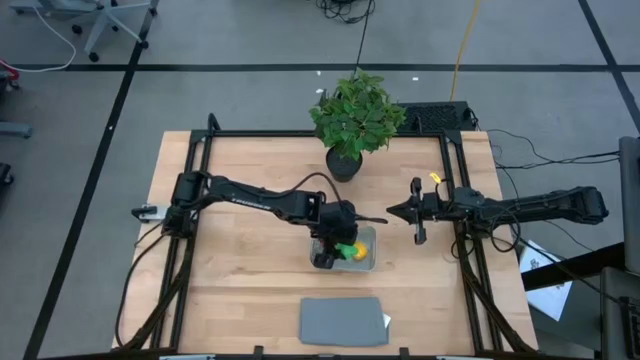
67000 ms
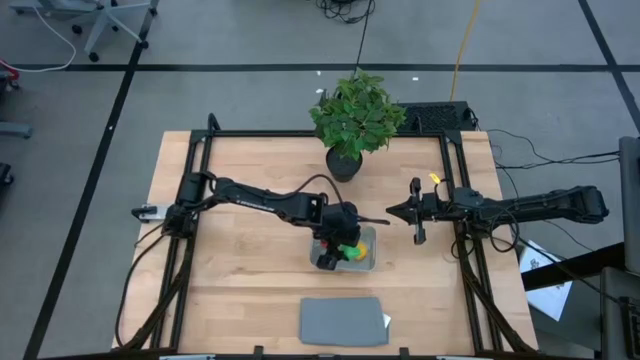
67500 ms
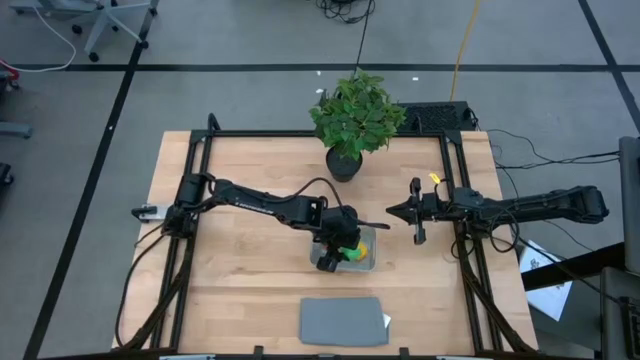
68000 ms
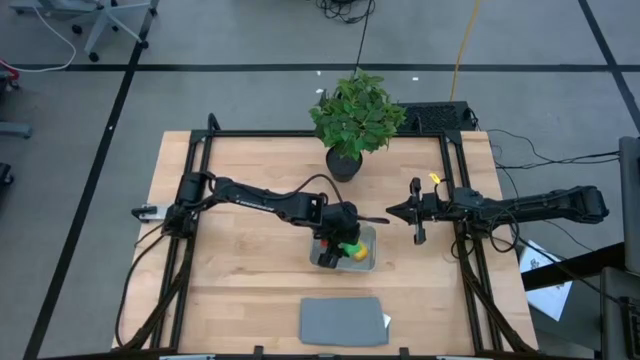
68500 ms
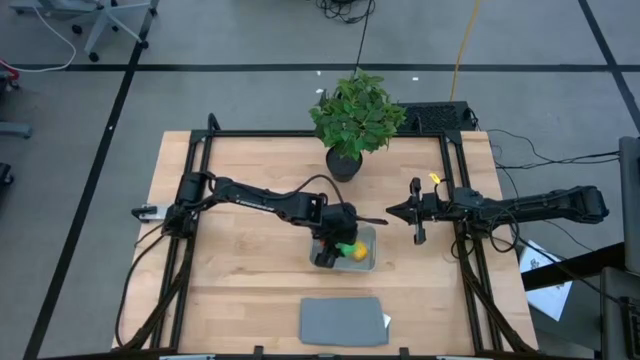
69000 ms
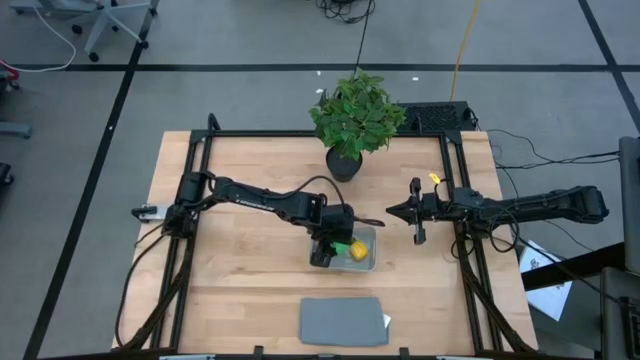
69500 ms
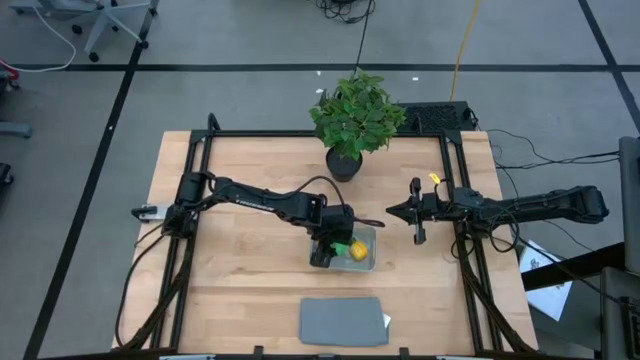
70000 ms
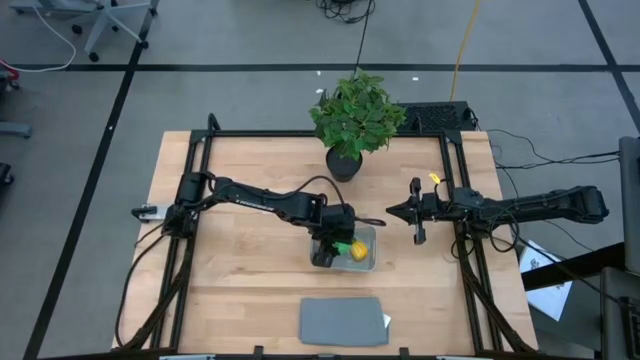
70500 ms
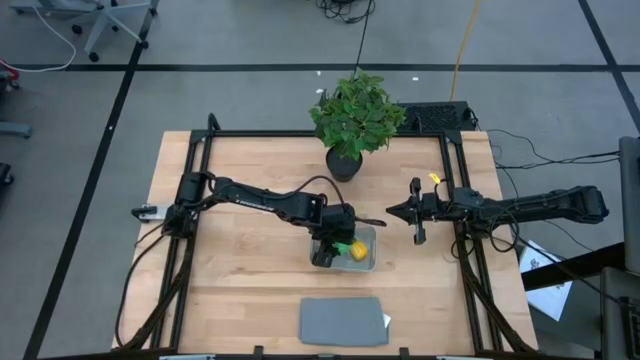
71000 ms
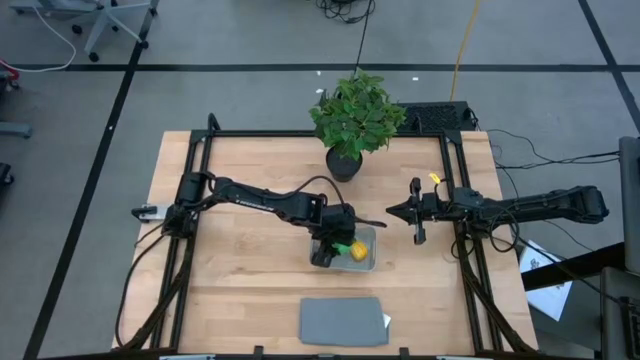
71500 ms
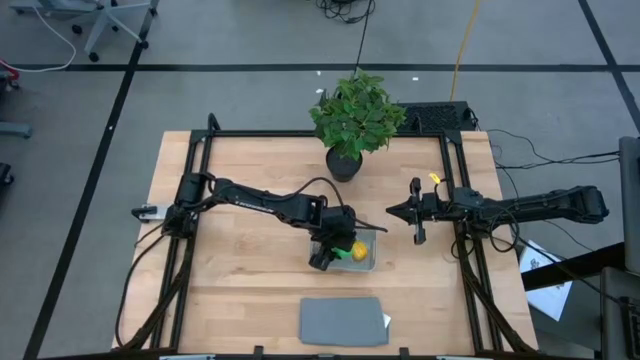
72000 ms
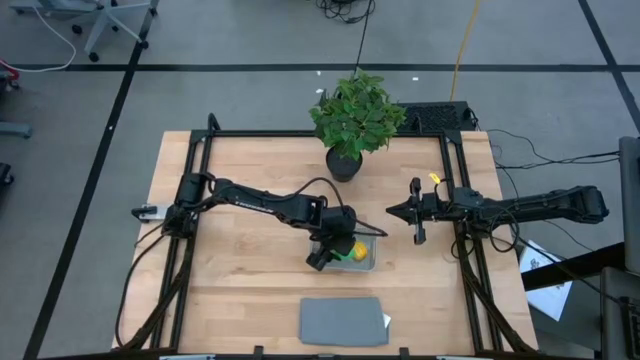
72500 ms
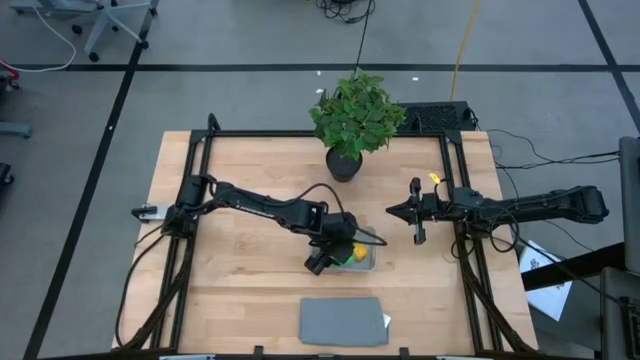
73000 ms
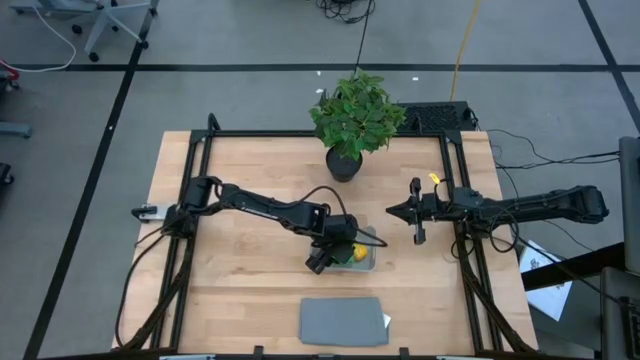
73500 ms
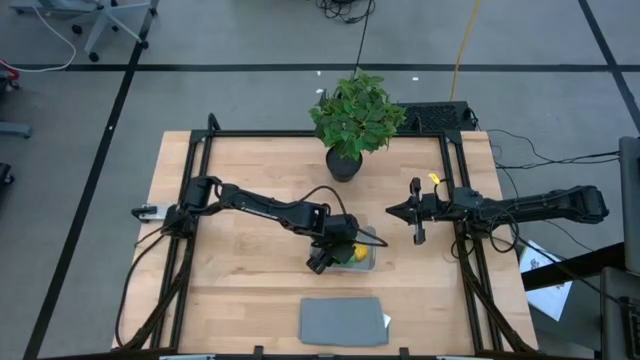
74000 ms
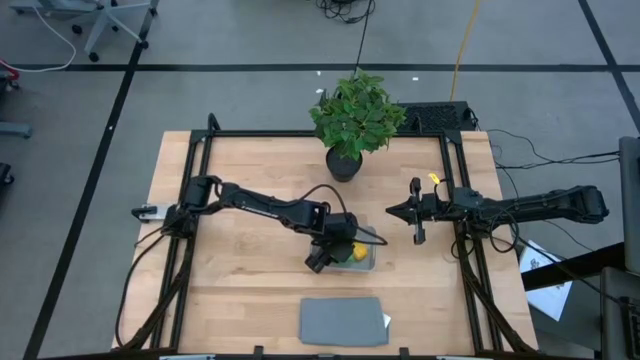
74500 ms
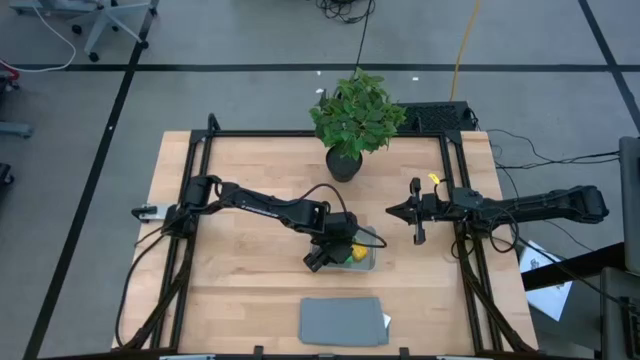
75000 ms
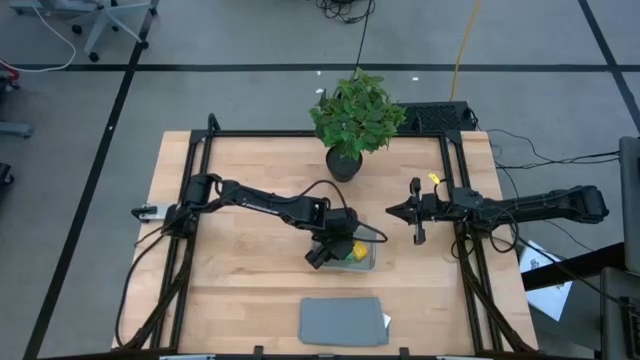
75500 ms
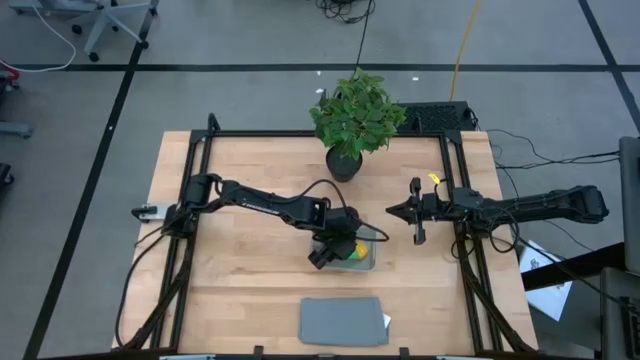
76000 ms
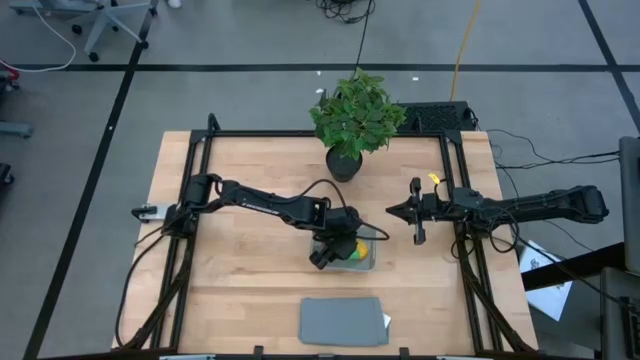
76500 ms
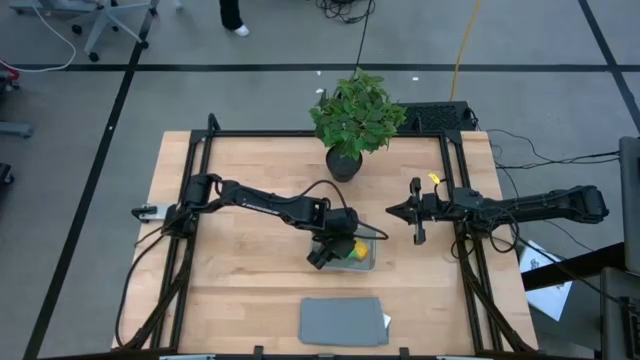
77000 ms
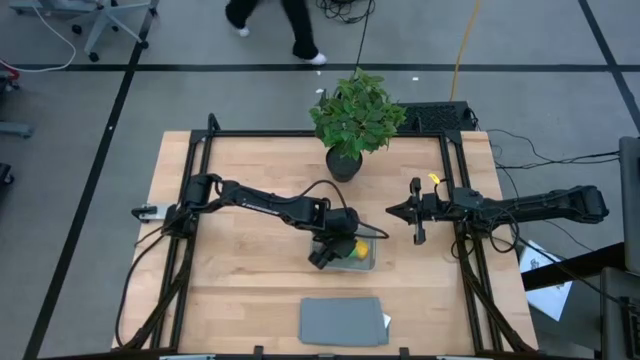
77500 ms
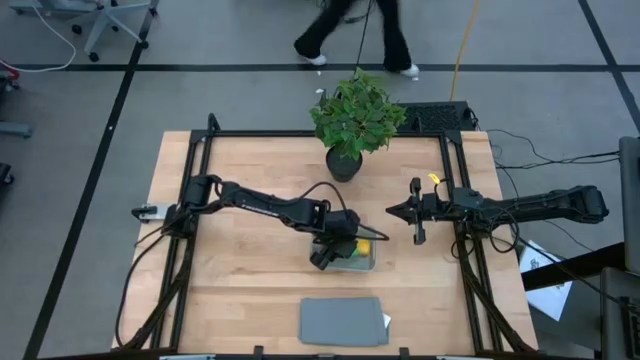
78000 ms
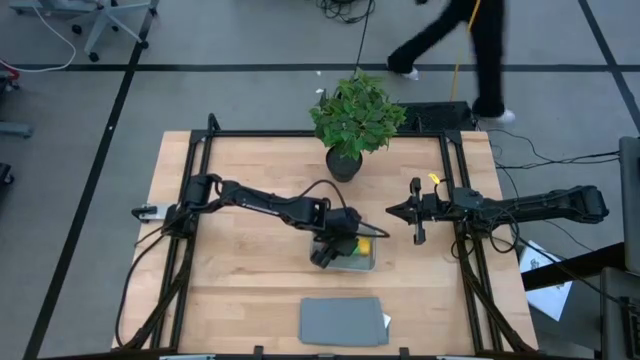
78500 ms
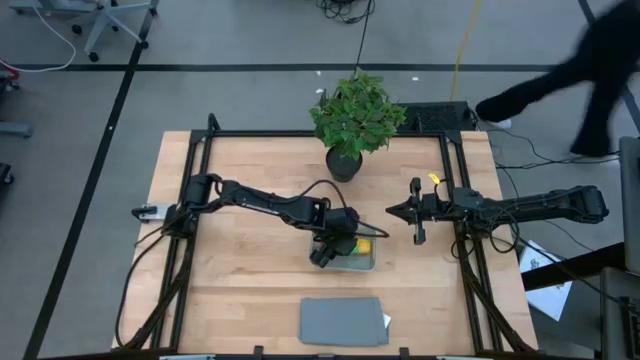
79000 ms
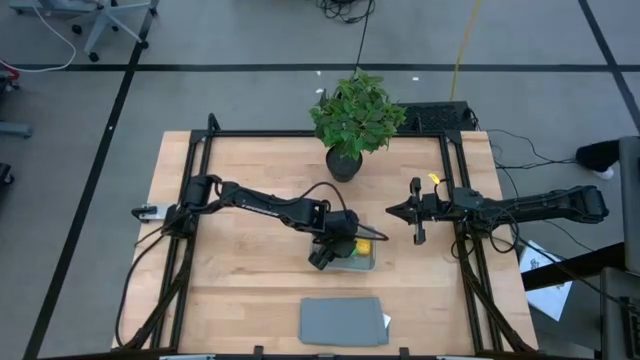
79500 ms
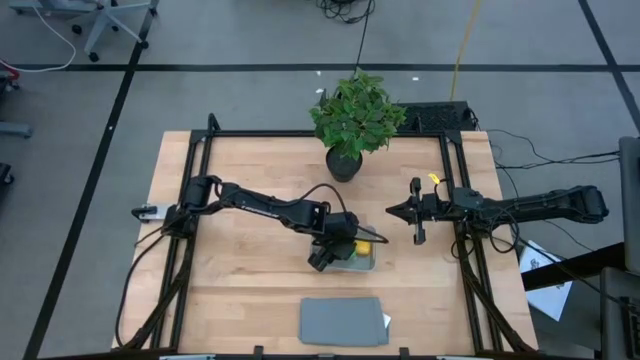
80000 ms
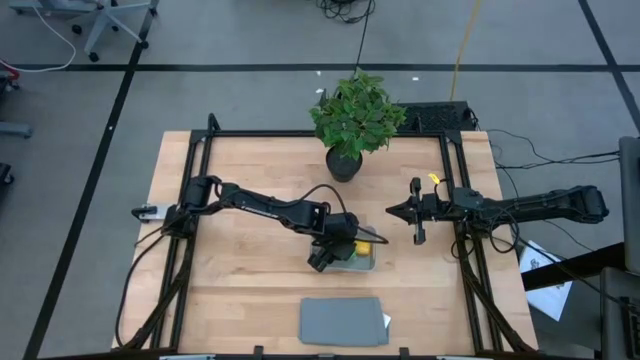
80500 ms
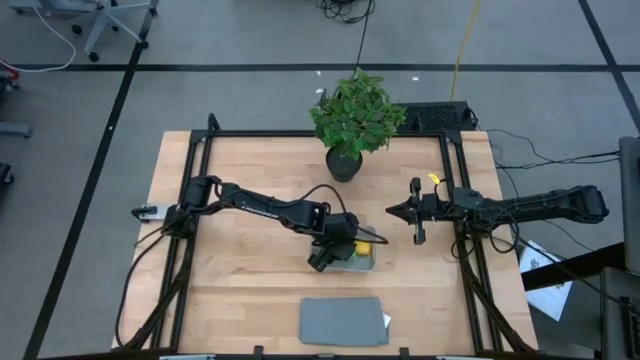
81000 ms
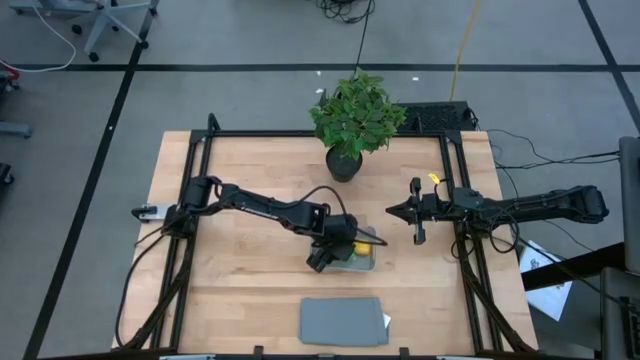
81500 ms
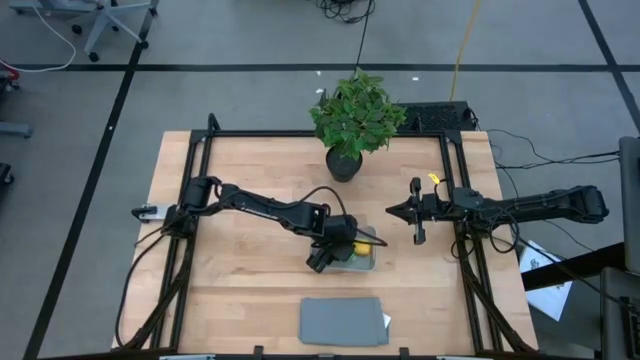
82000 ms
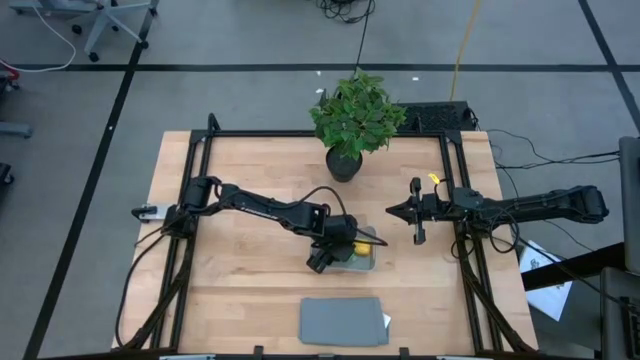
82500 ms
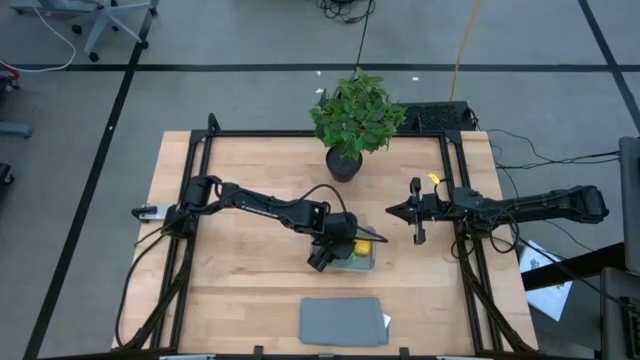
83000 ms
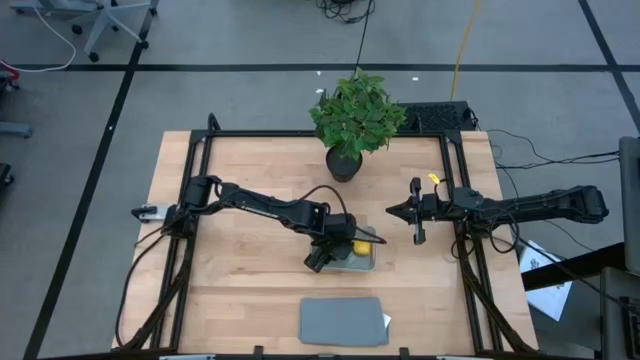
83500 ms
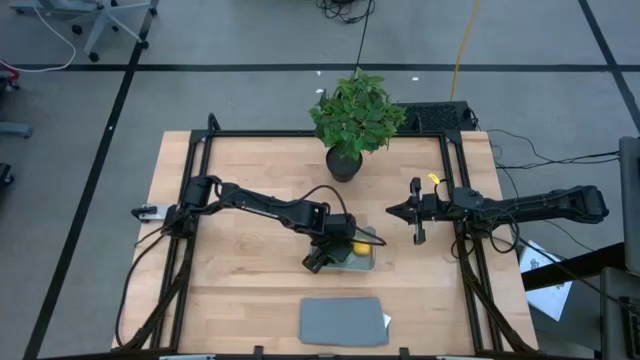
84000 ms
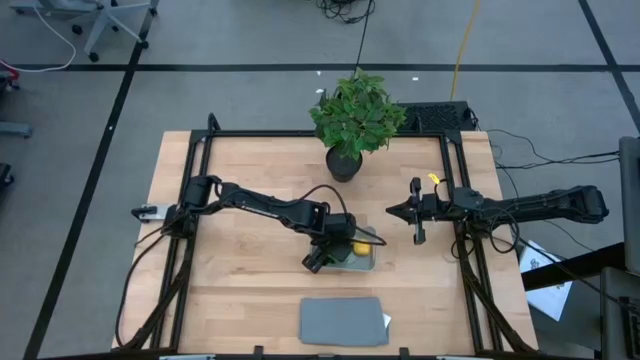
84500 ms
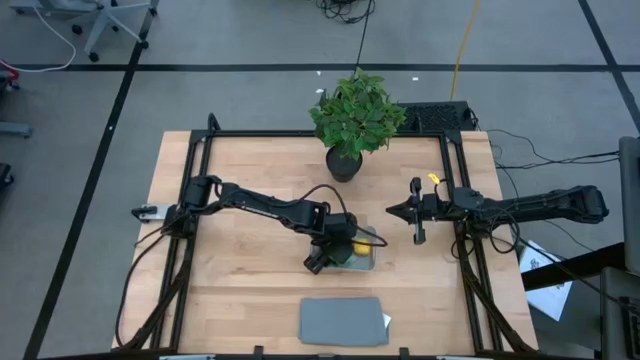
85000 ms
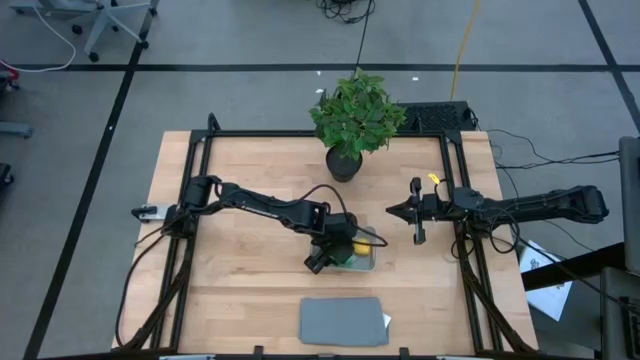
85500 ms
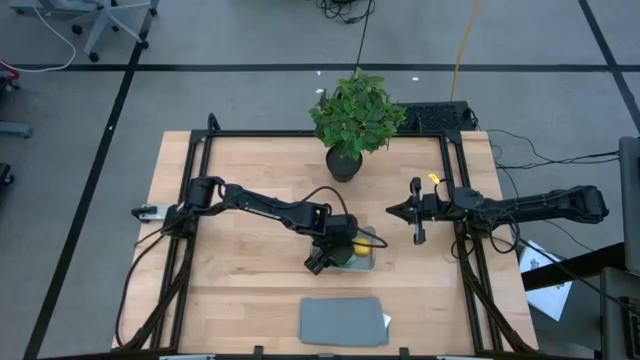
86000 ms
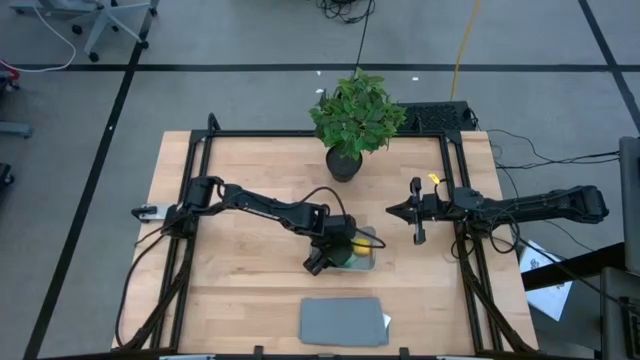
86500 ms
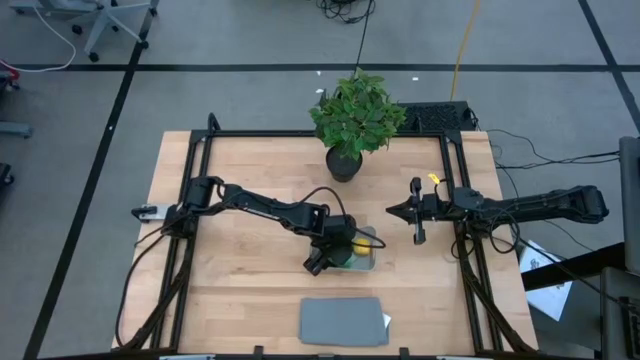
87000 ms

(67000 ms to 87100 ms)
Task: Pick and placing Produce into tupperware
Put the pear into the basket

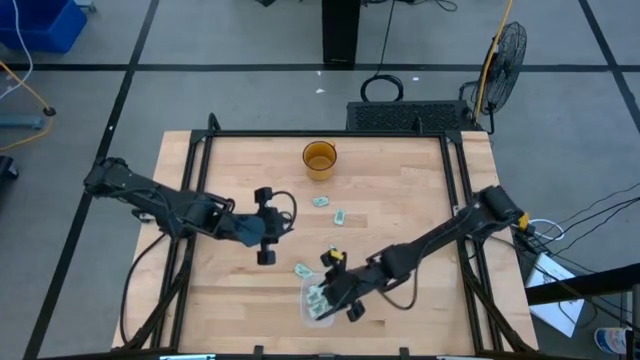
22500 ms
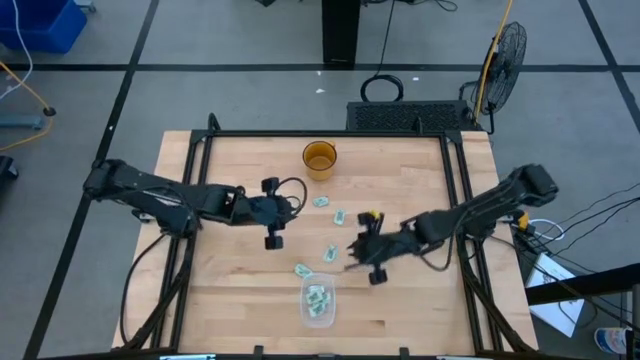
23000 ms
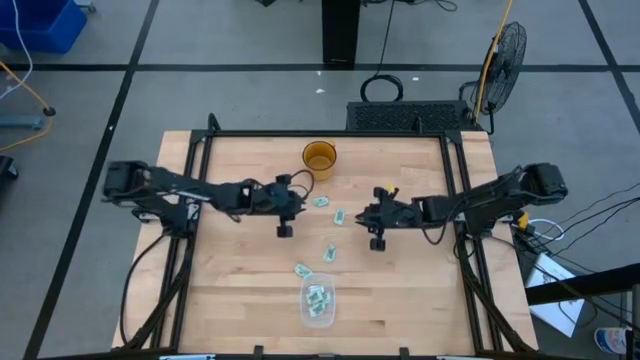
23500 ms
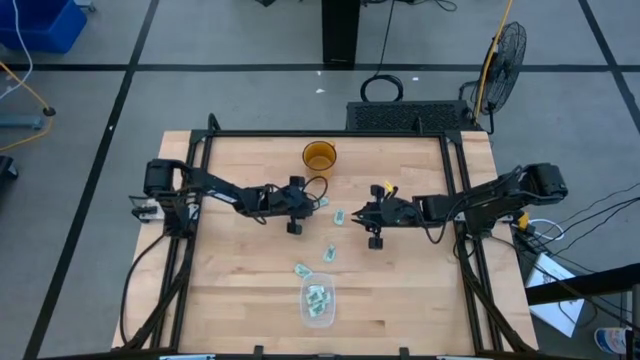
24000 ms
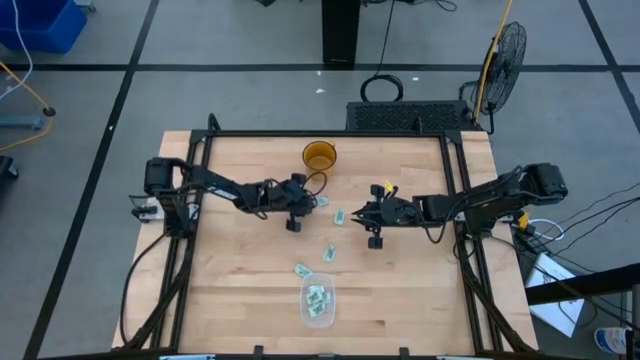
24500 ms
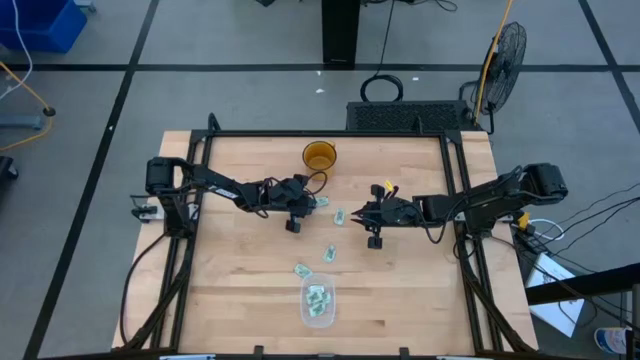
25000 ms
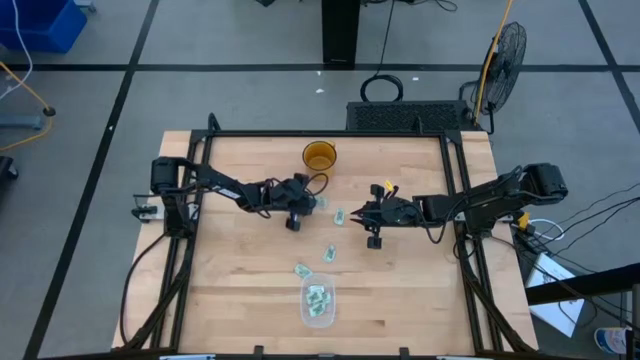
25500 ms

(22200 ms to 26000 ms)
Task: Pick and place Stevia / Truvia into bins
Put the green stevia packet into the transparent container
